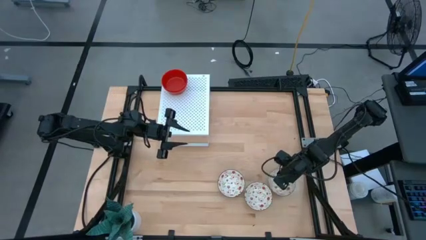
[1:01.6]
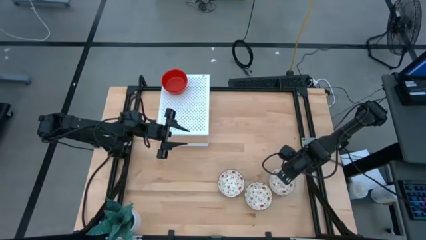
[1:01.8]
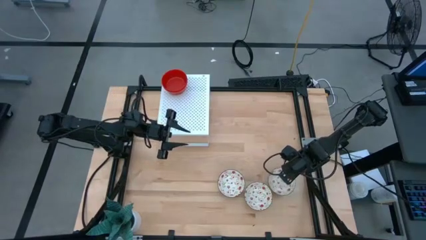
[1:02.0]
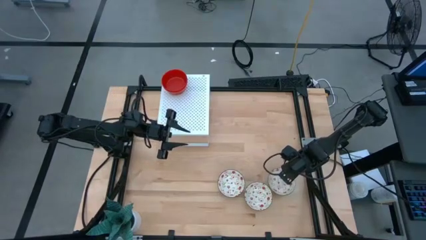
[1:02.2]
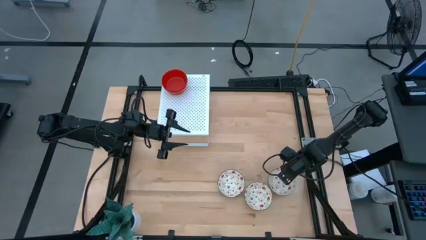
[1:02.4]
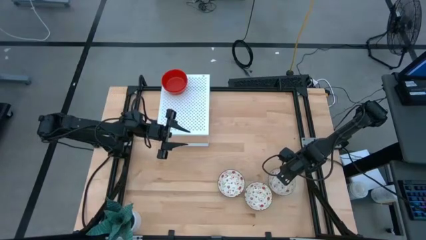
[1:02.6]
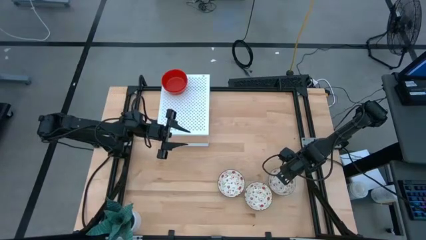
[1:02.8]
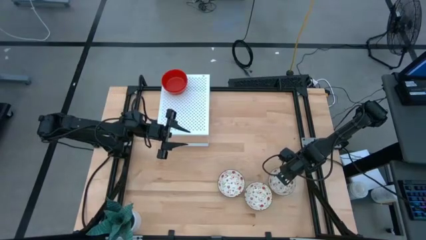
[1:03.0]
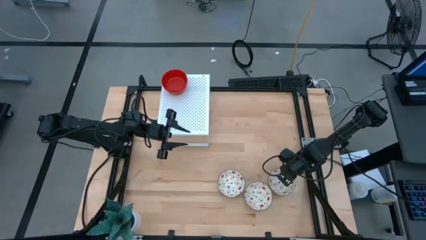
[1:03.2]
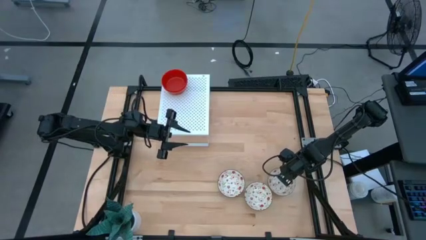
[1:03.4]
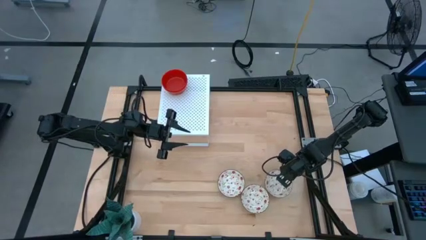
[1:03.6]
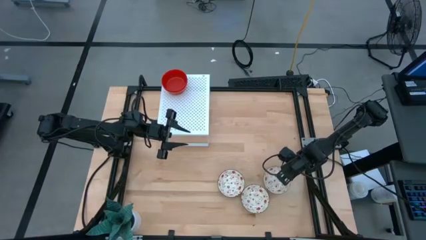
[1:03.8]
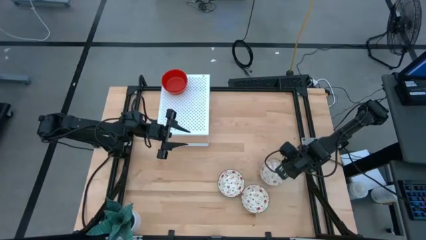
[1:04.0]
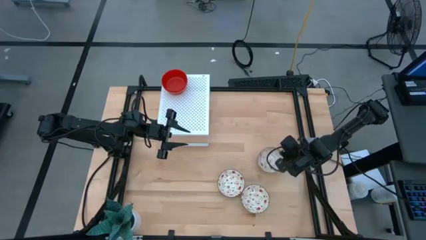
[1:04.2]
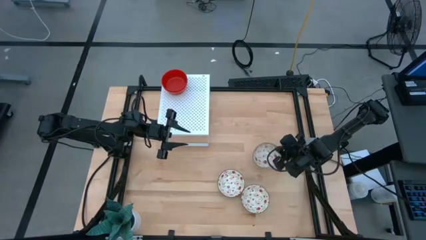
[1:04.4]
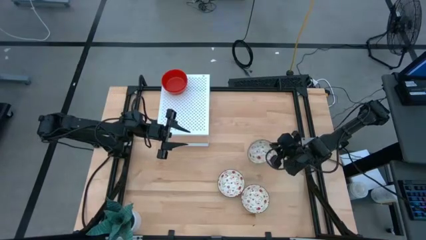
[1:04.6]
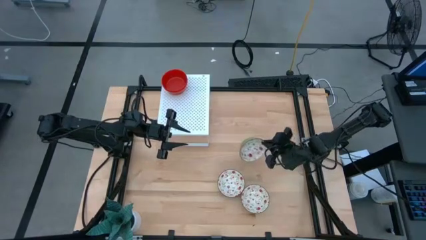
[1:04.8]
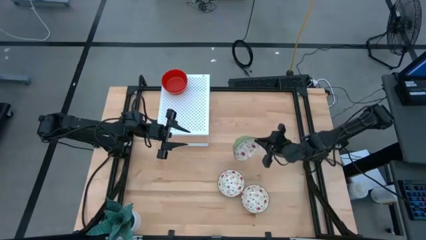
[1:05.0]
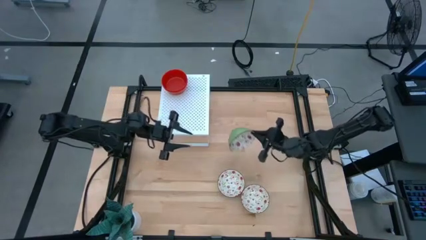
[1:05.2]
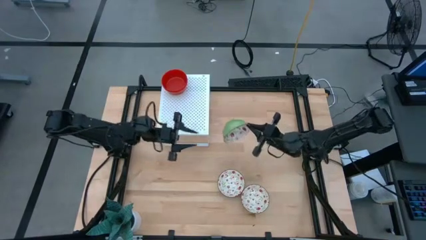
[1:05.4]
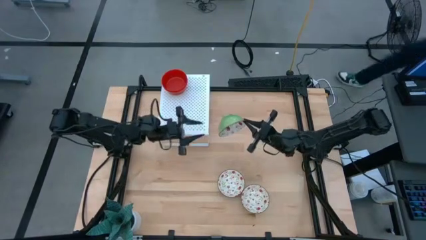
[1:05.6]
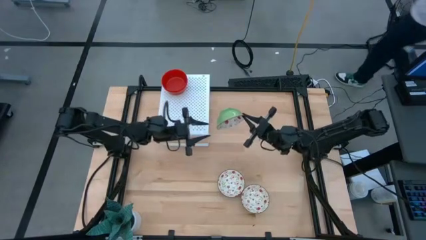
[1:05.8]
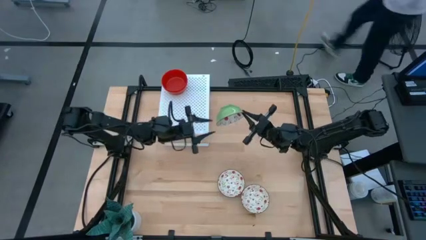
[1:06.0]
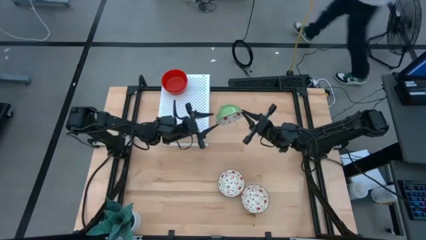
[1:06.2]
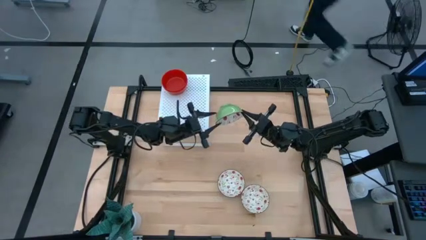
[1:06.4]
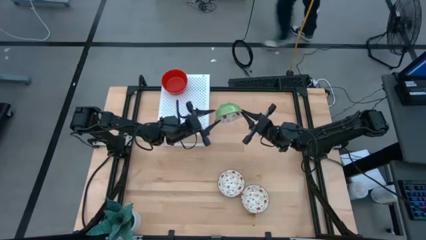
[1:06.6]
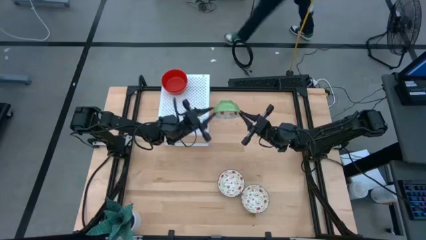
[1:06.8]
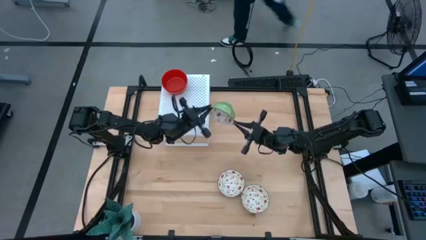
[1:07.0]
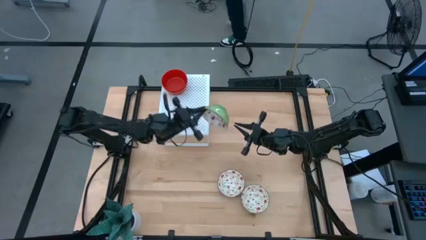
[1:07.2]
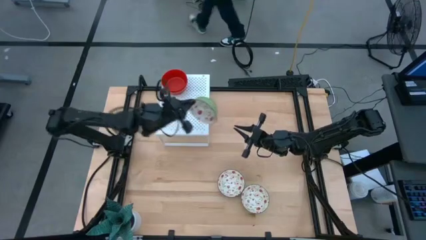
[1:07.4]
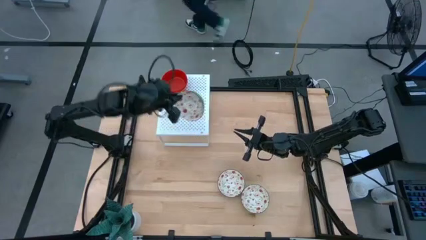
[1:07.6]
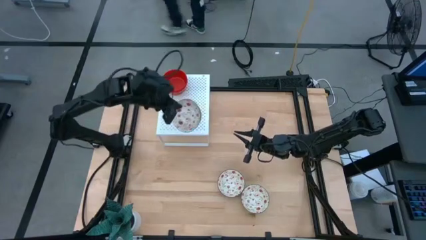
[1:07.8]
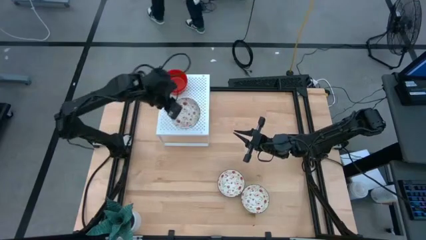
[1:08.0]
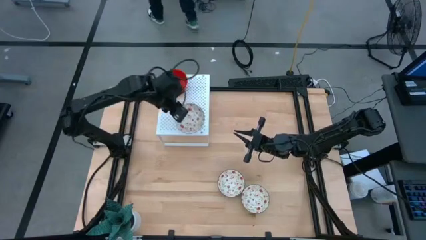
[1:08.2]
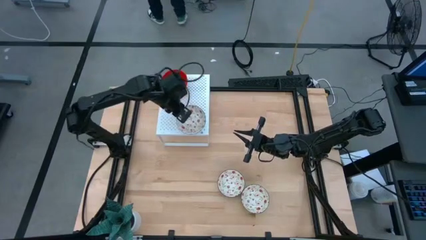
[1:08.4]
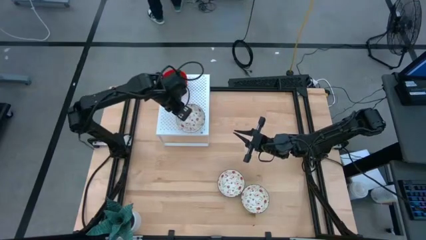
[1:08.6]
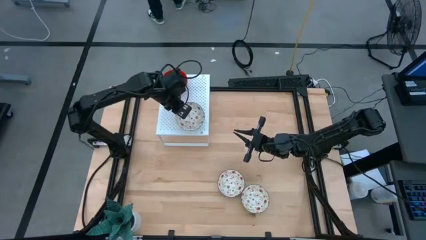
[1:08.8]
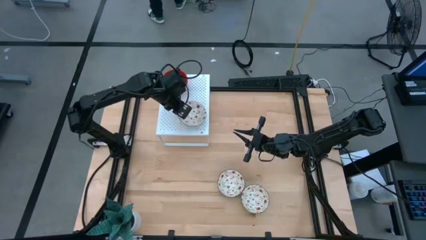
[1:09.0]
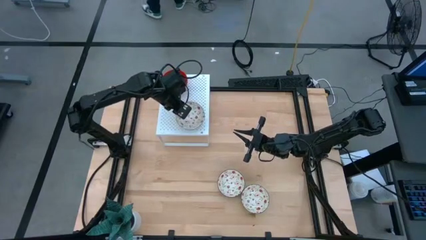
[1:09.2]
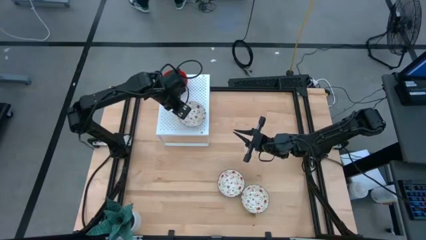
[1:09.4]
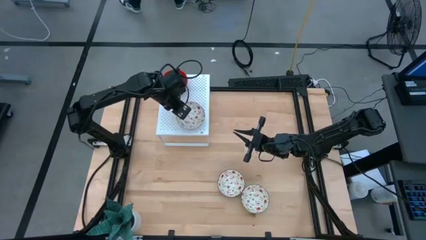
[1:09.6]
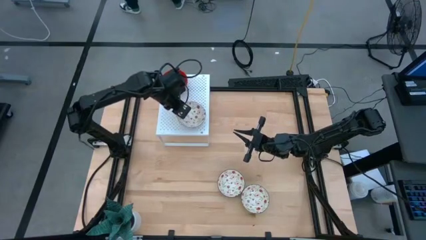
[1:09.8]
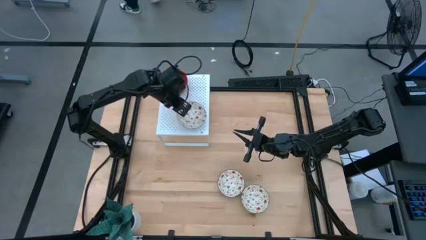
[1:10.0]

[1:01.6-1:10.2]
Task: Pick & Place Mini bowls
Put the right white patterned bowl on the shelf

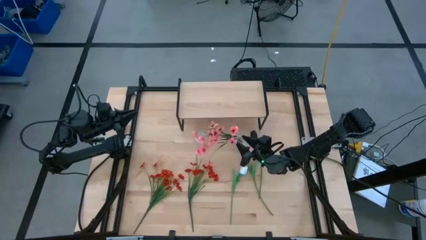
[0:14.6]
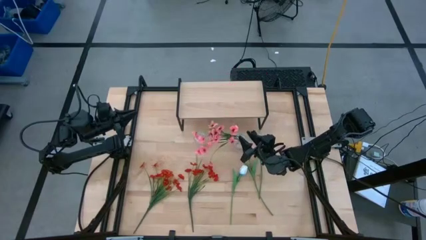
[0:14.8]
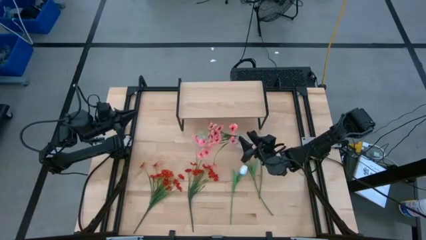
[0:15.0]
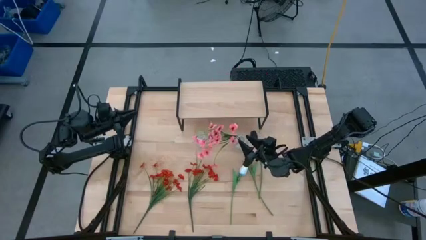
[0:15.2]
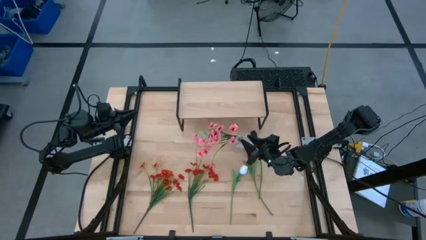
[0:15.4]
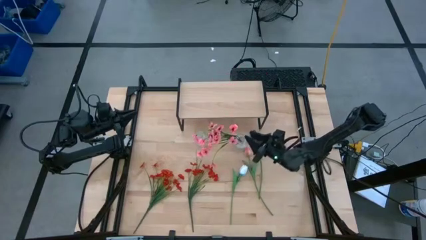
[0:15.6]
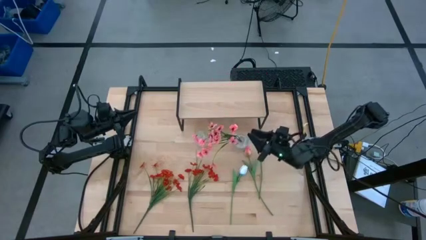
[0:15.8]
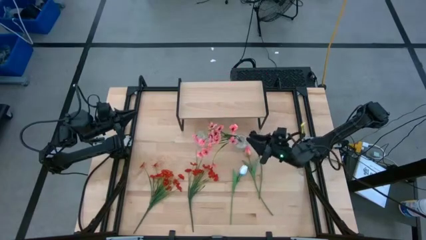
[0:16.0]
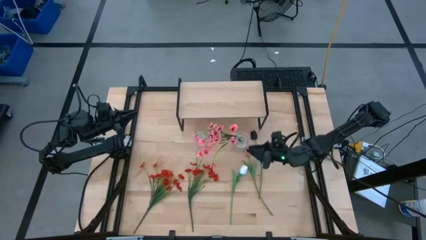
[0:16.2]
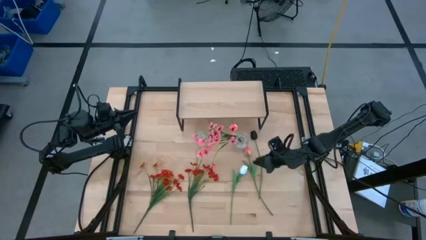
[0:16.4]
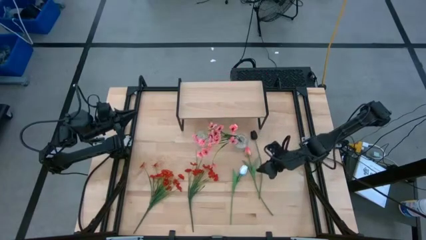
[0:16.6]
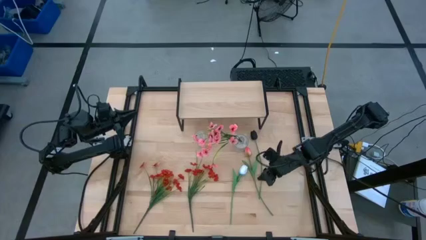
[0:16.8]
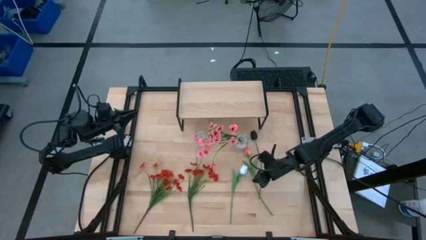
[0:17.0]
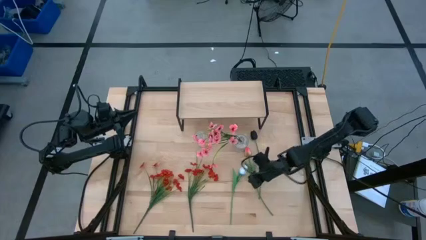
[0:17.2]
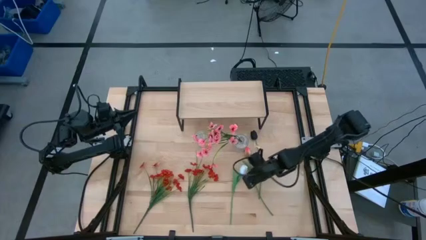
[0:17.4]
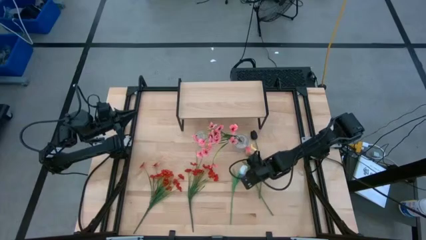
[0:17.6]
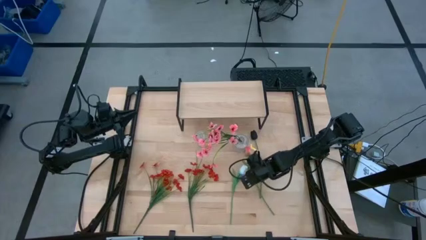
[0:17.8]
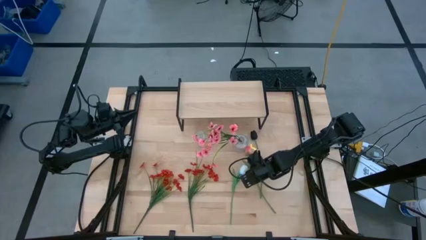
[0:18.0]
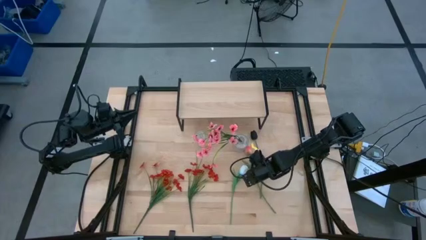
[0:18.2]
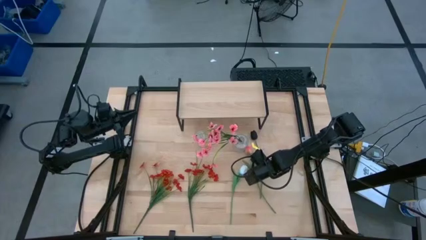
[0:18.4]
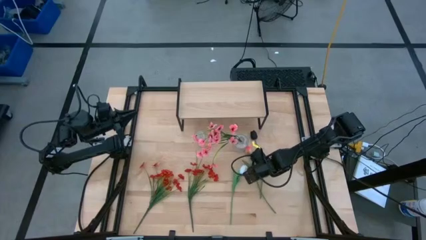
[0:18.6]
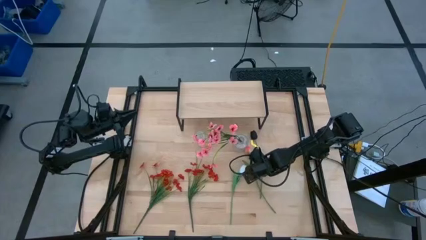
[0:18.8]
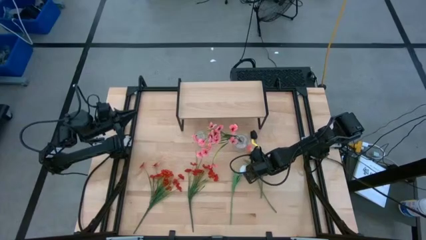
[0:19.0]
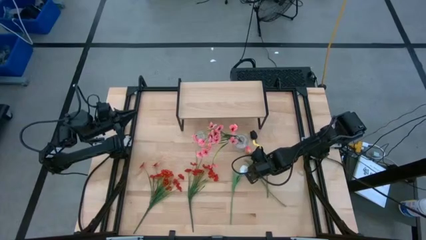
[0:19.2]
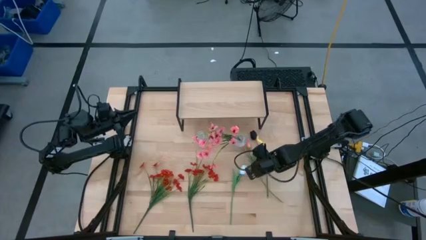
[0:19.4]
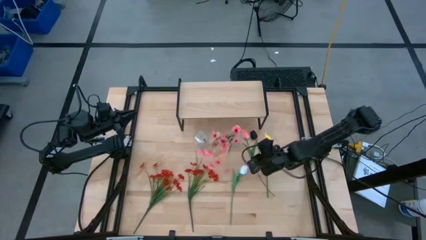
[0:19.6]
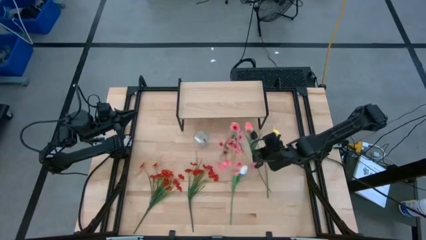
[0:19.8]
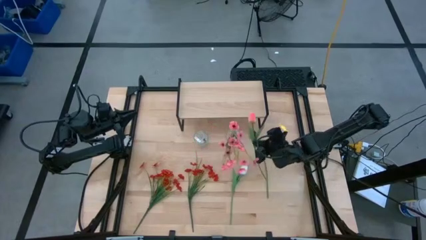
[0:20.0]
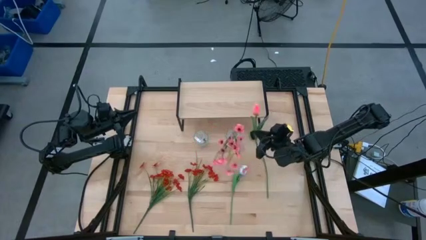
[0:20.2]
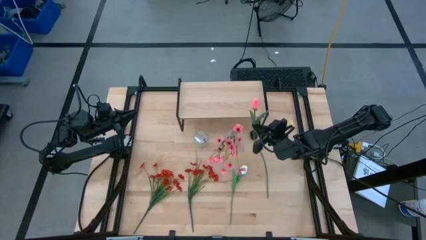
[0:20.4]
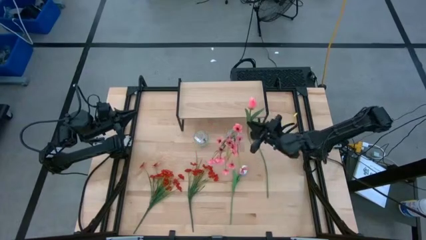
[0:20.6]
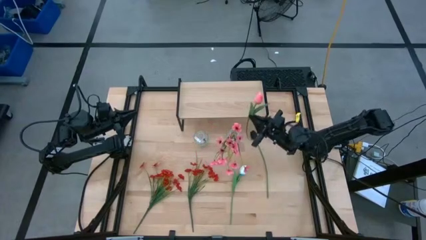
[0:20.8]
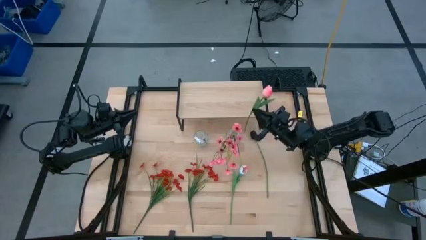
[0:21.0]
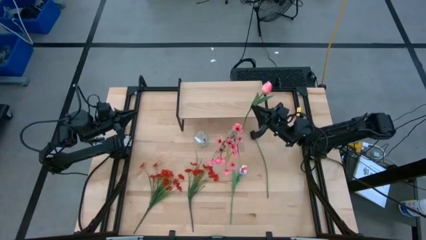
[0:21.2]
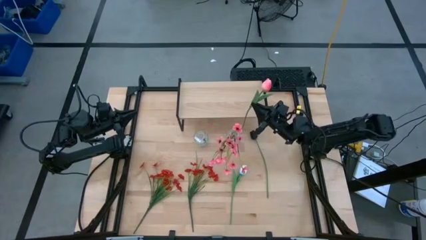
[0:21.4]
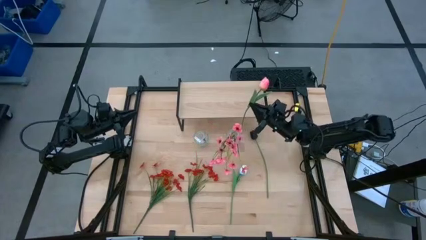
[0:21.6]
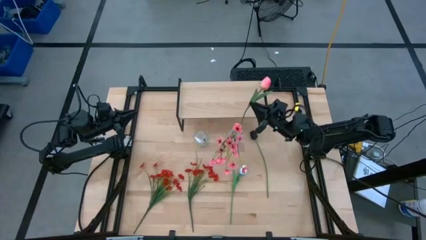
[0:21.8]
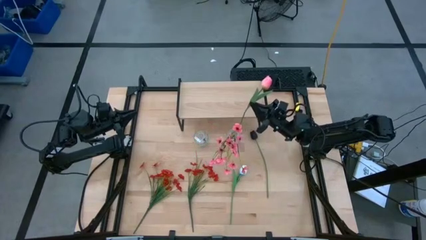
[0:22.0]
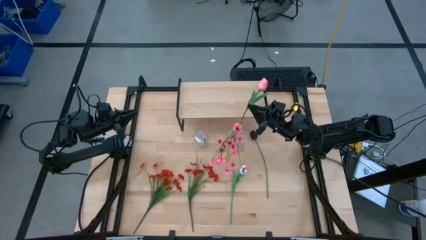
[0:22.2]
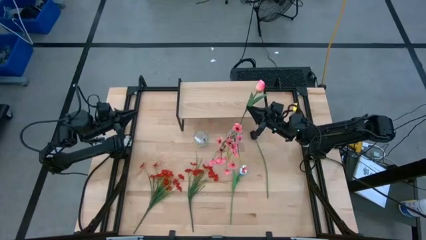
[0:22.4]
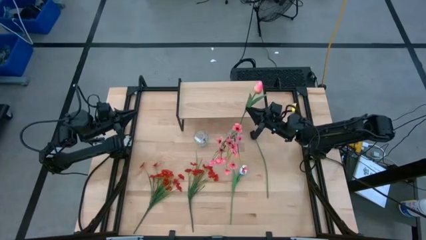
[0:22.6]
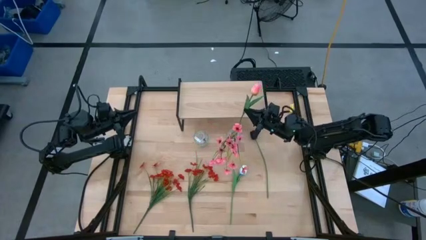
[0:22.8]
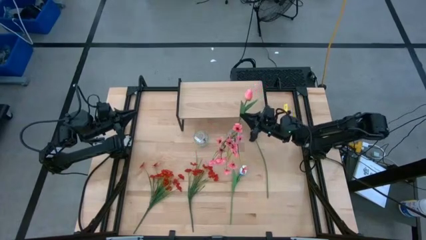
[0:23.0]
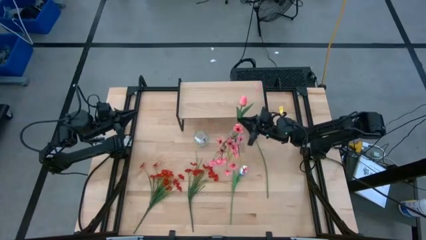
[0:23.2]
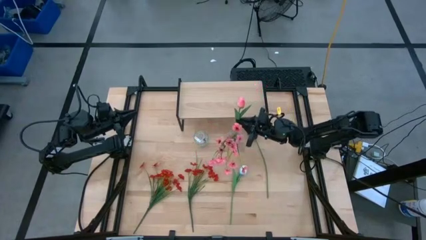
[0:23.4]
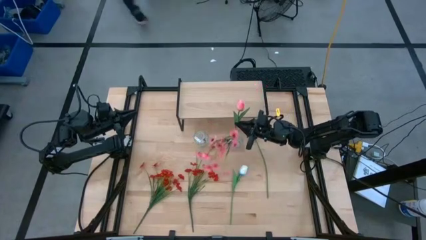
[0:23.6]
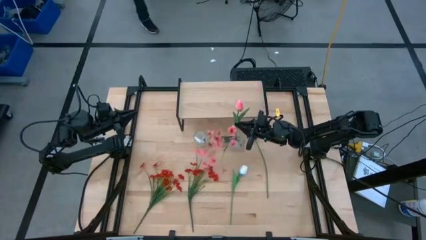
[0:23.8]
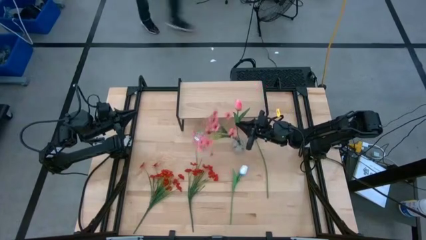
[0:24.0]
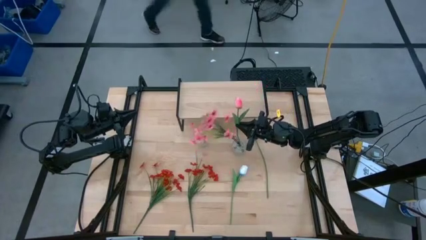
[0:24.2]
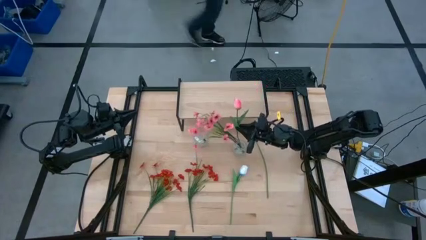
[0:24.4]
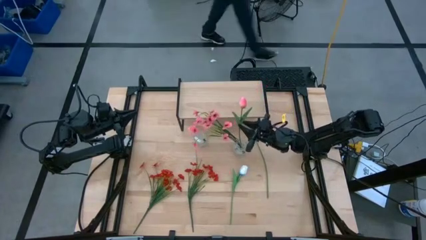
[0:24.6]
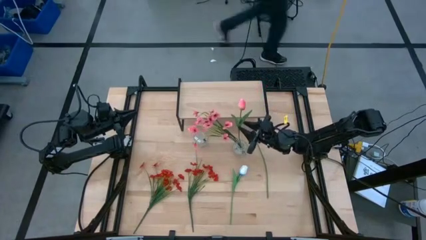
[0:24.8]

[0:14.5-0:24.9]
Task: Pick and place flowers into a vace then onto a shelf
Put the pink tulip into the right transparent vase
